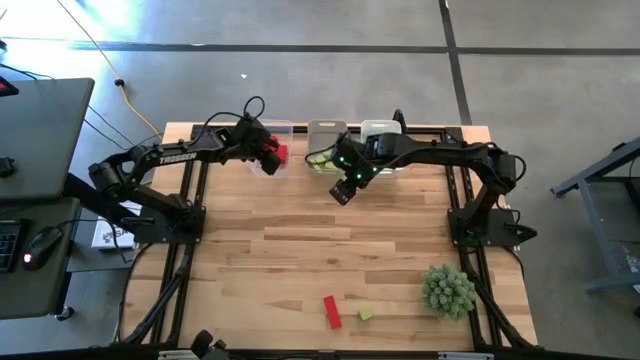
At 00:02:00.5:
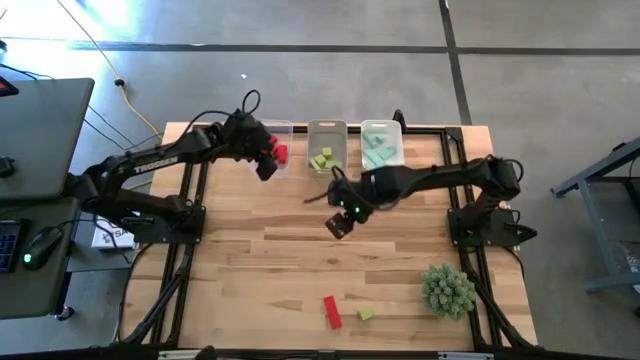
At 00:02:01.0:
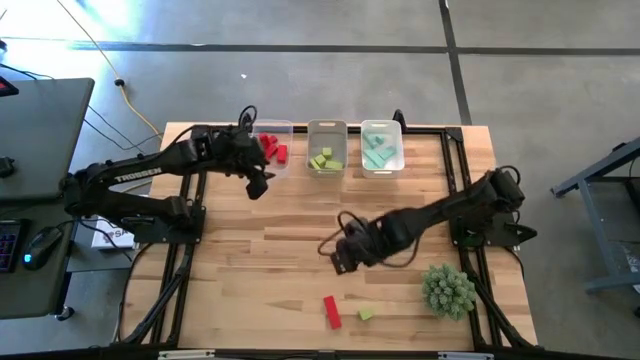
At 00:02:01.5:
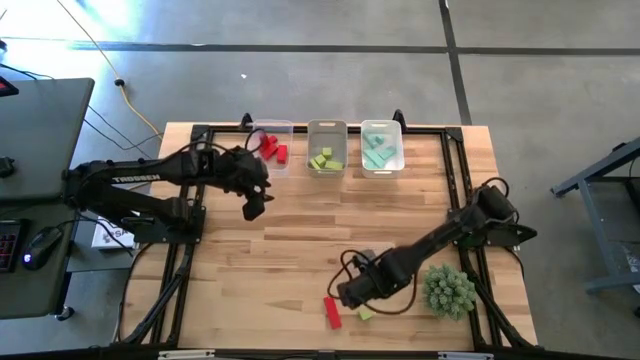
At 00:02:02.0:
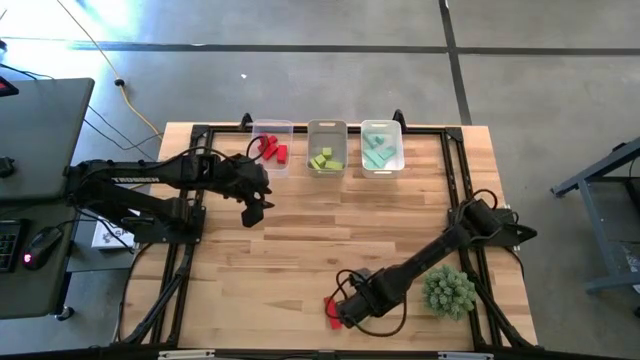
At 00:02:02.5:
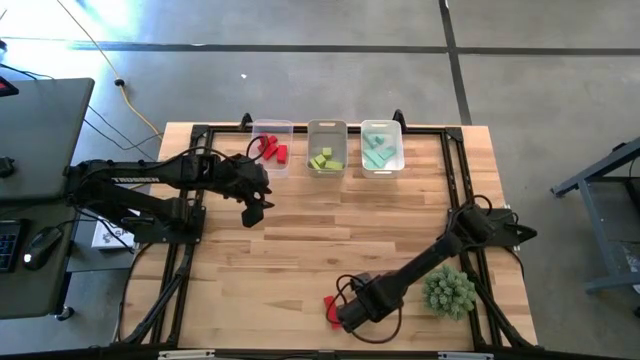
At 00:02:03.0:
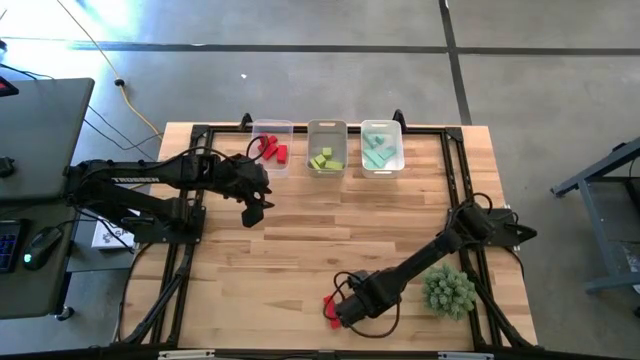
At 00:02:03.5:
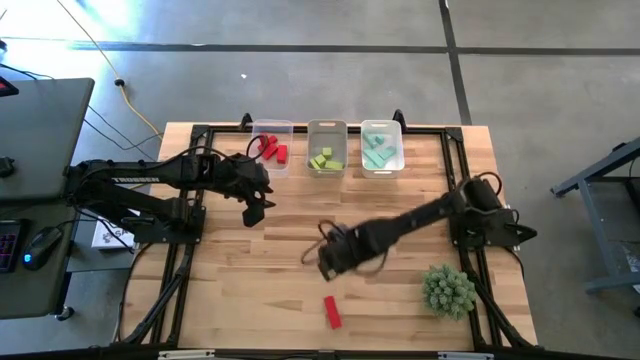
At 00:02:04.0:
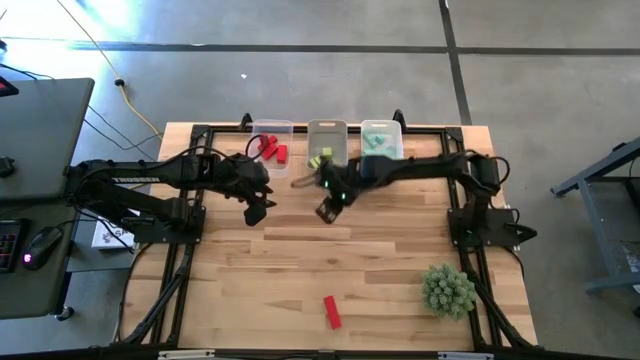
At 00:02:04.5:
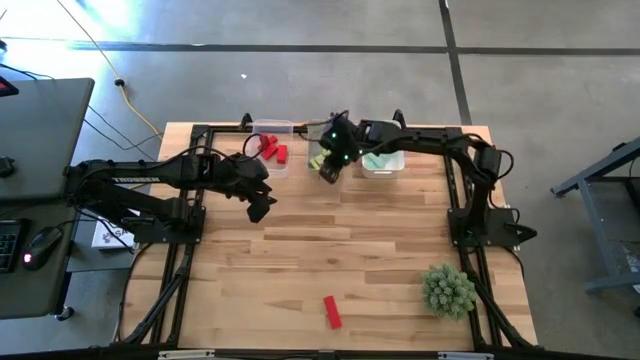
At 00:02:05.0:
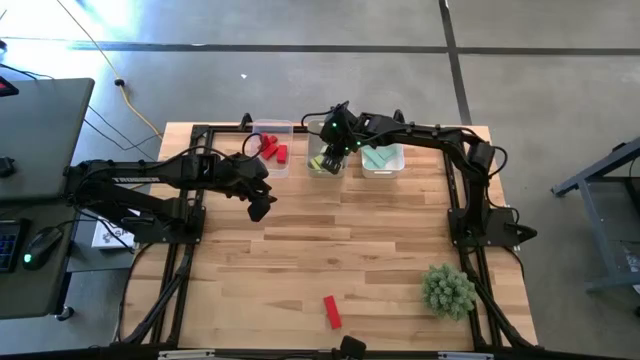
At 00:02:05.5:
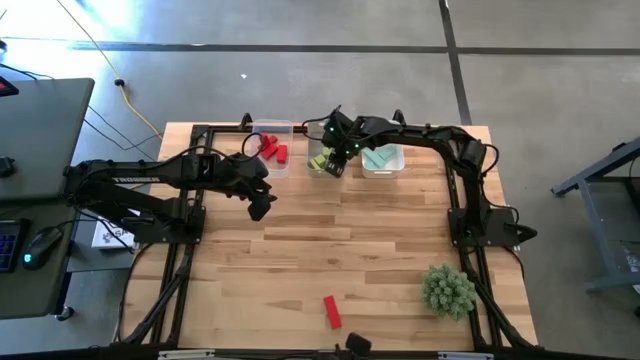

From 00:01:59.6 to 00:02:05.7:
Task: Sort & place blocks by color
Put the green block into the gray bin

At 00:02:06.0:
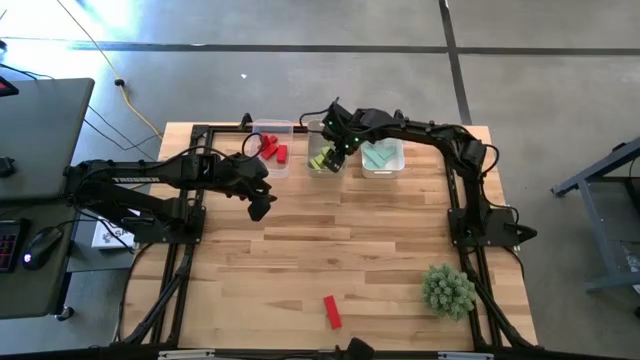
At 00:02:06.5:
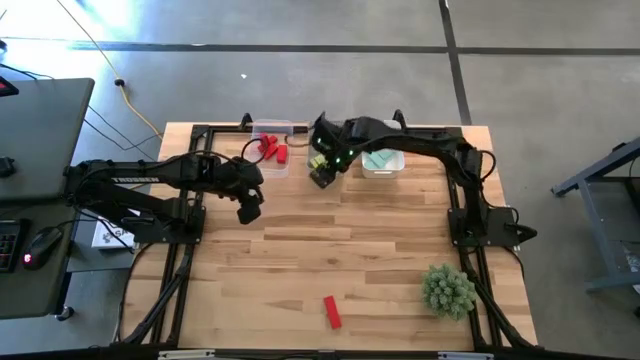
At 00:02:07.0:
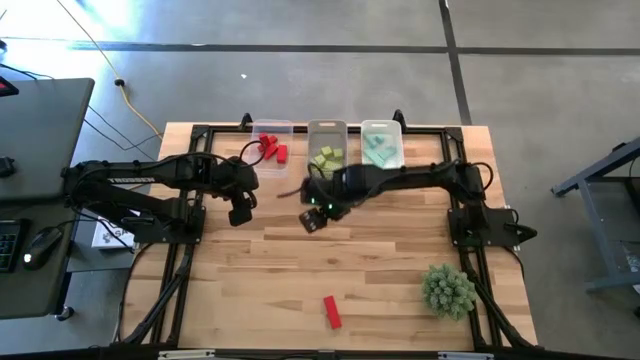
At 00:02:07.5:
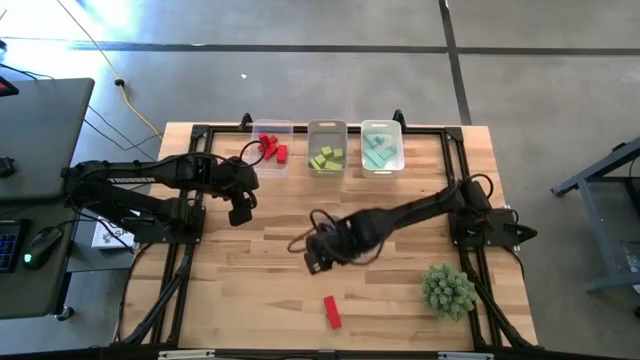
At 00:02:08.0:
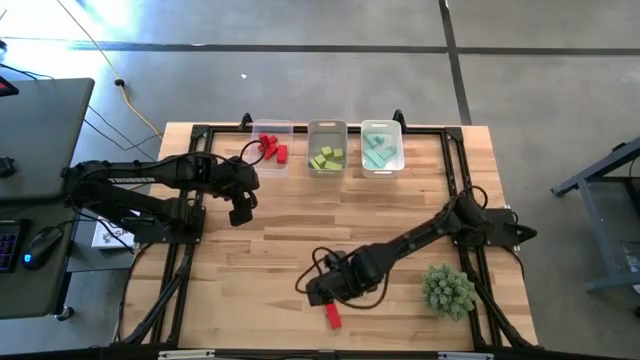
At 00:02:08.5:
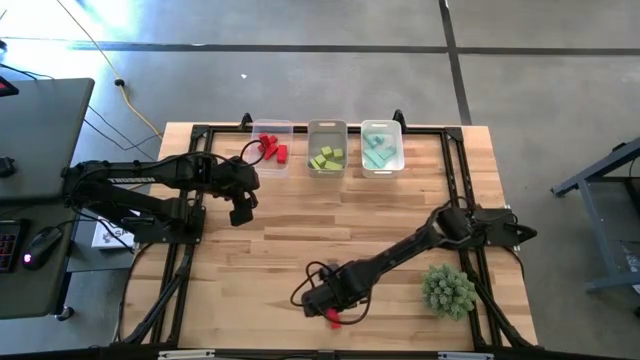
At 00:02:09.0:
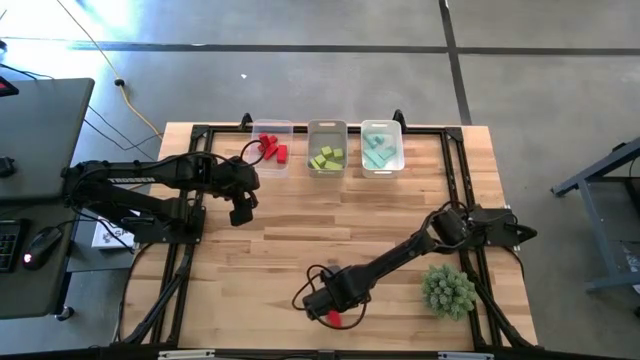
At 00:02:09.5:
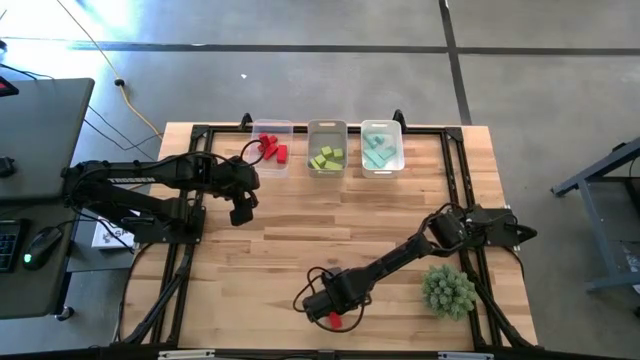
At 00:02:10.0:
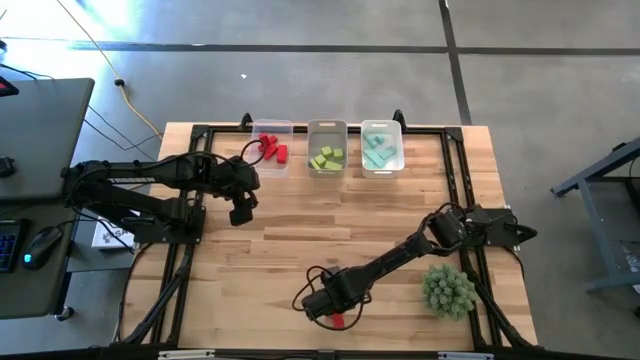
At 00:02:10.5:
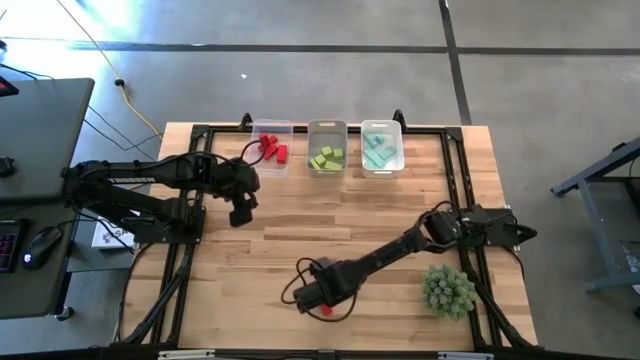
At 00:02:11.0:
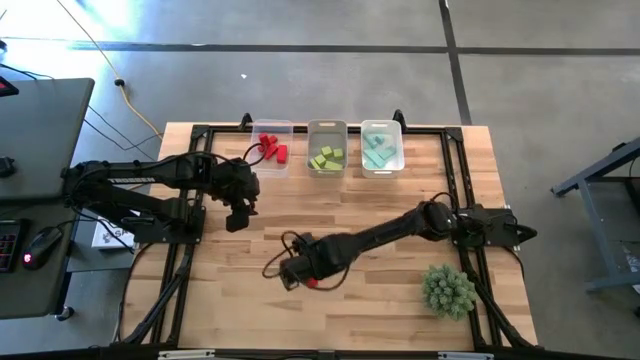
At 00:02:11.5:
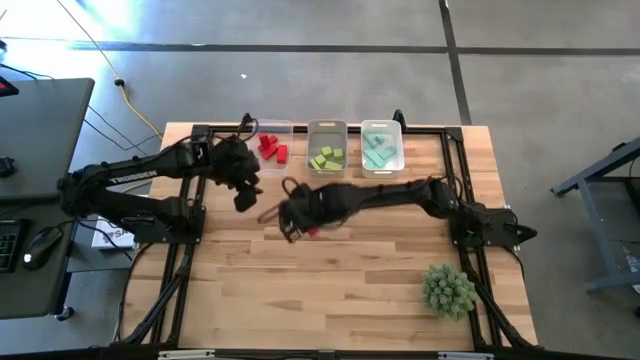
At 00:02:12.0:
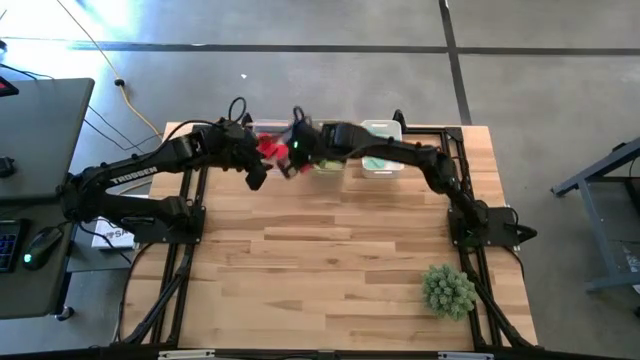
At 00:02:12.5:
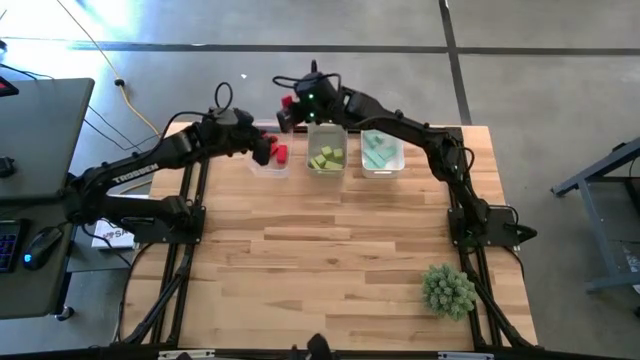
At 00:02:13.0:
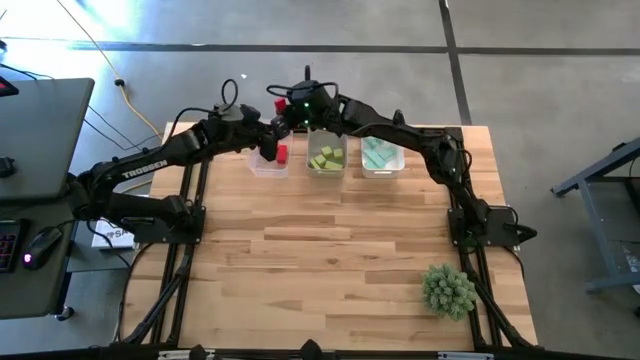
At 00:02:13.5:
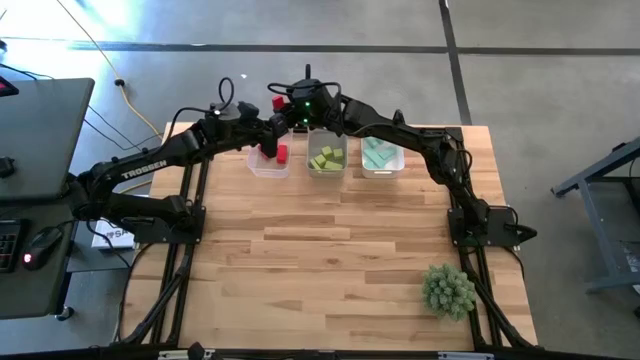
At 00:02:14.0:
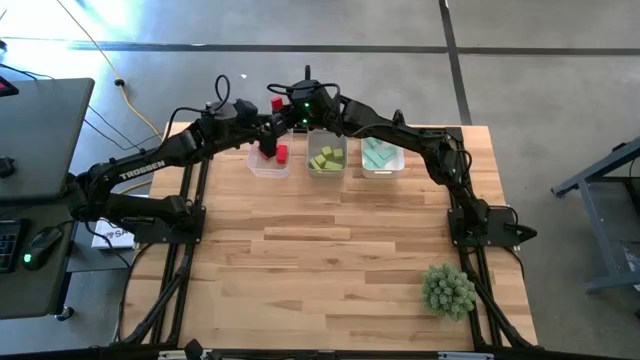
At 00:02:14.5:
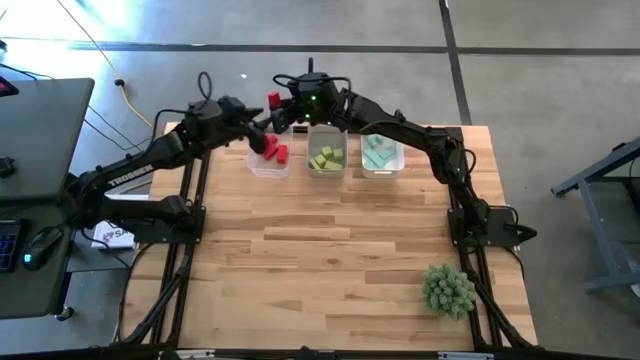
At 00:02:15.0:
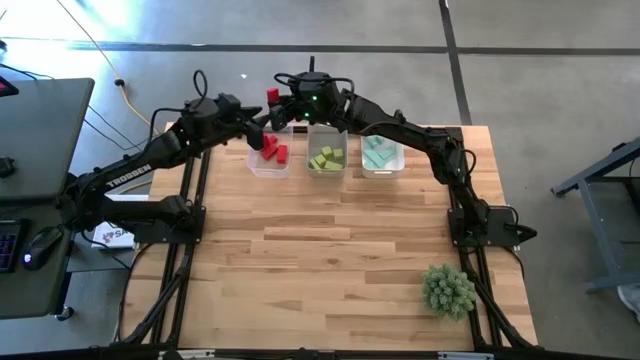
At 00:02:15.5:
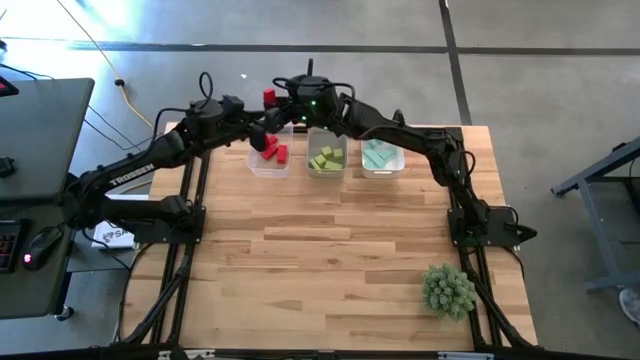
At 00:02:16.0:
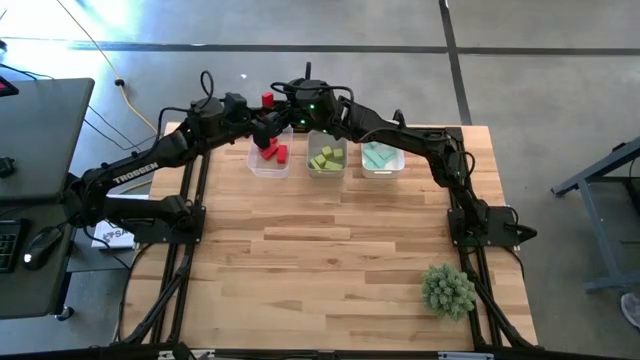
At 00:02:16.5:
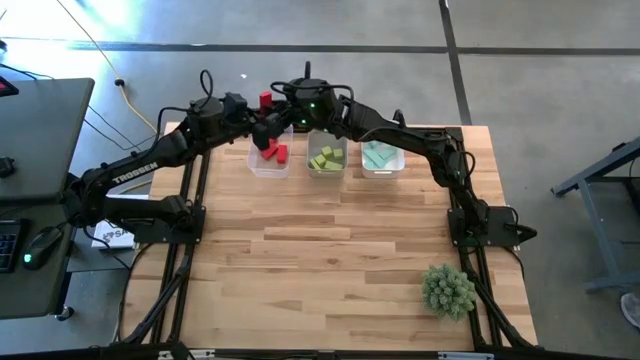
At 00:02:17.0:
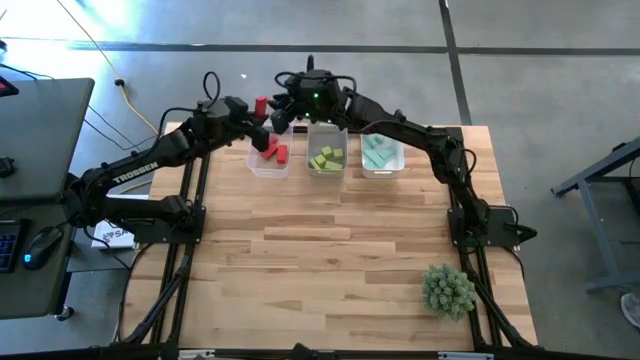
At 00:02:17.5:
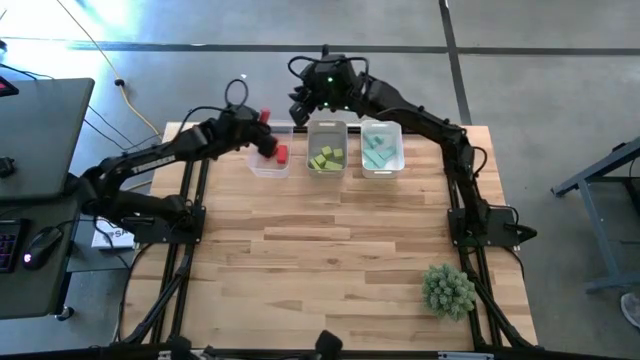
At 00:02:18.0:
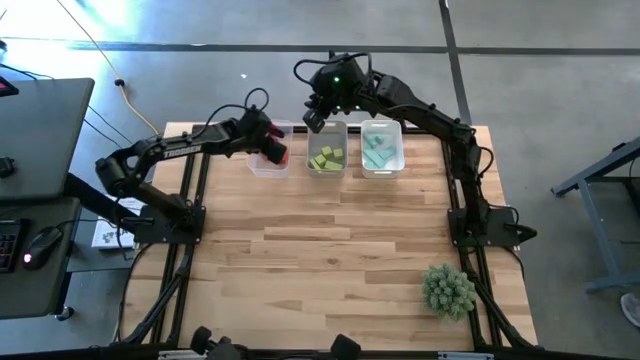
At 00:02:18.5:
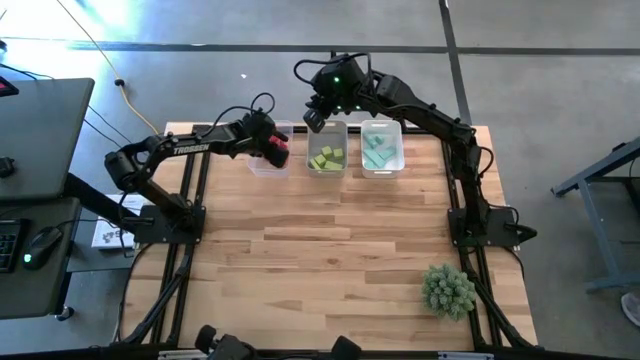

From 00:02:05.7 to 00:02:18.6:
Put the red block into the transparent bin

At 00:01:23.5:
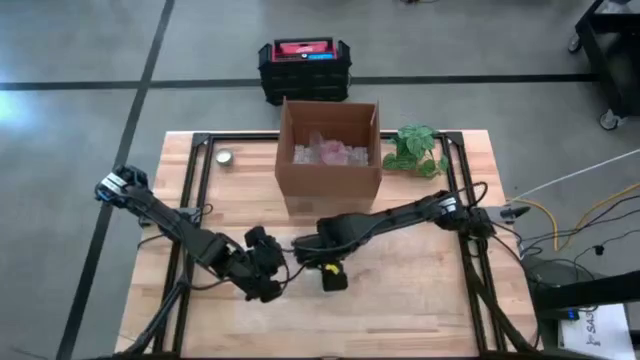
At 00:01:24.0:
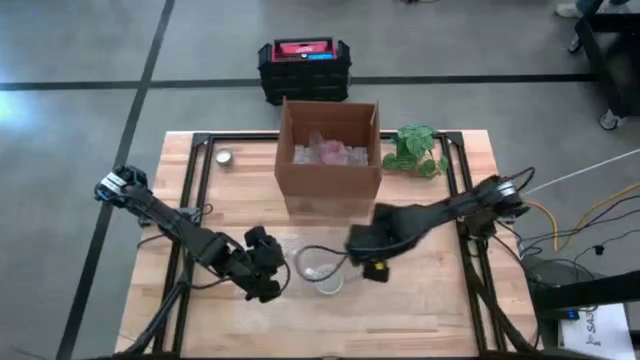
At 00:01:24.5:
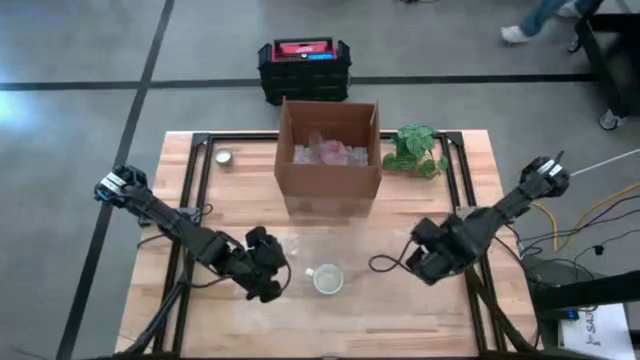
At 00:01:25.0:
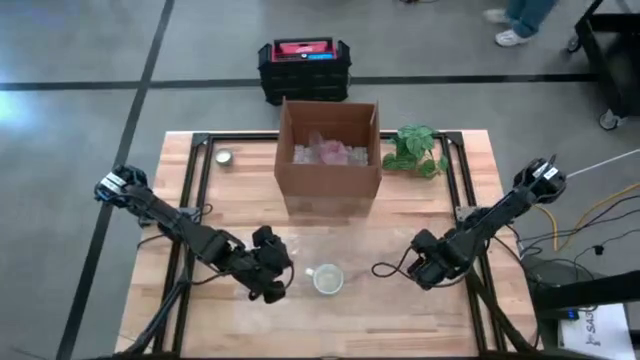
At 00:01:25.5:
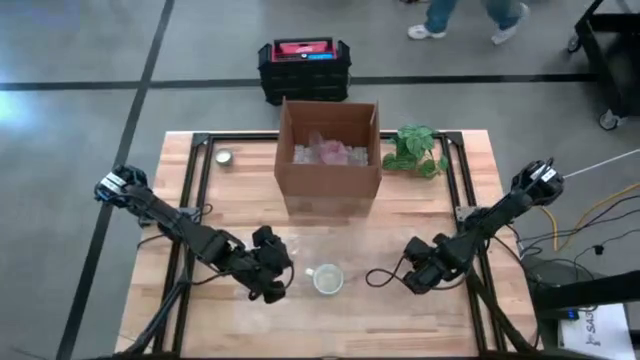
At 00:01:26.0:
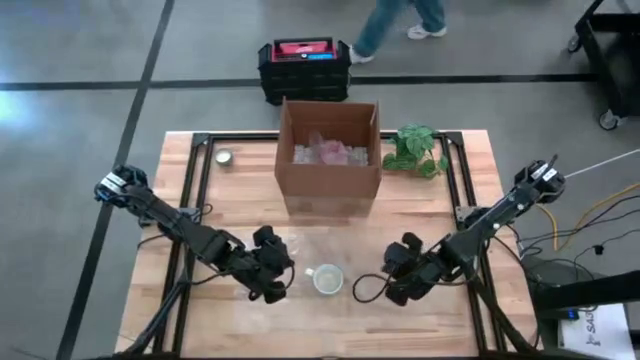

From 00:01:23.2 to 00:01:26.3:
Task: wrap mug
Wrap the white mug in bubble wrap
